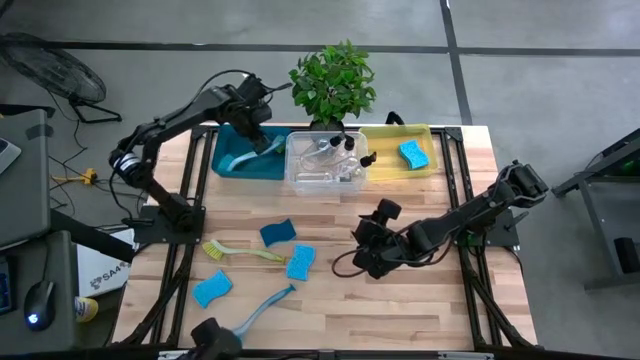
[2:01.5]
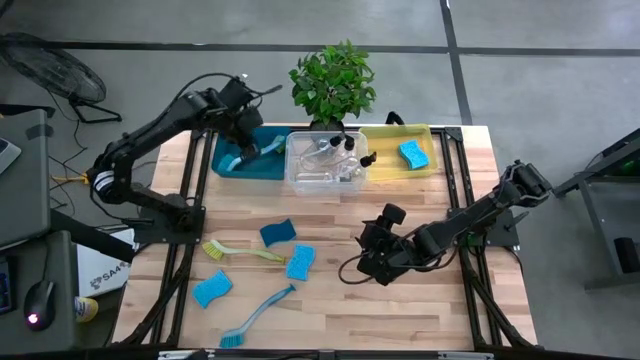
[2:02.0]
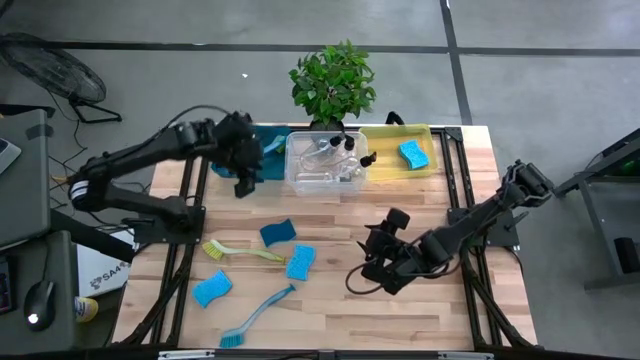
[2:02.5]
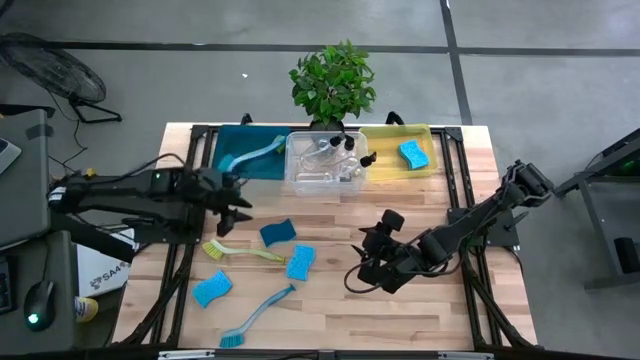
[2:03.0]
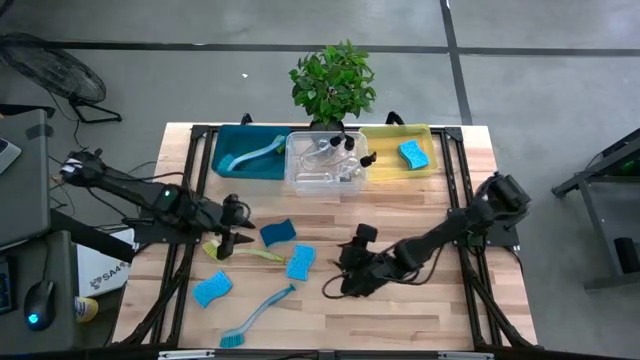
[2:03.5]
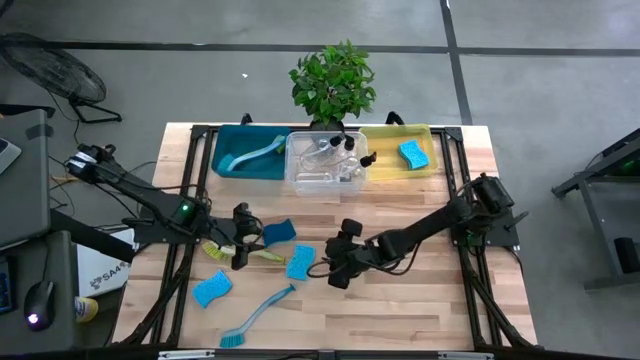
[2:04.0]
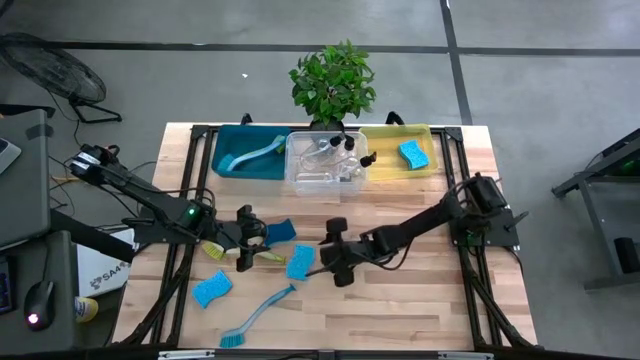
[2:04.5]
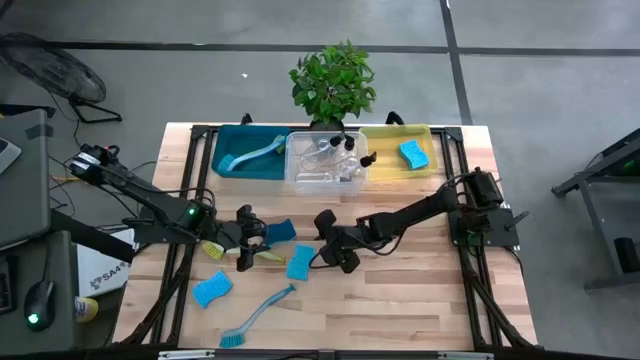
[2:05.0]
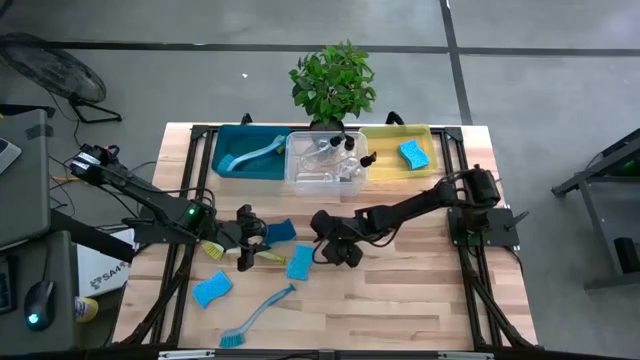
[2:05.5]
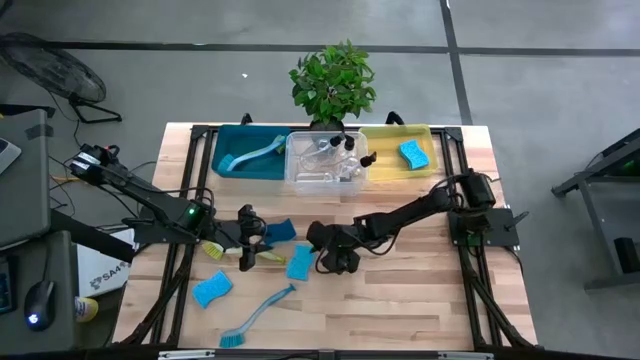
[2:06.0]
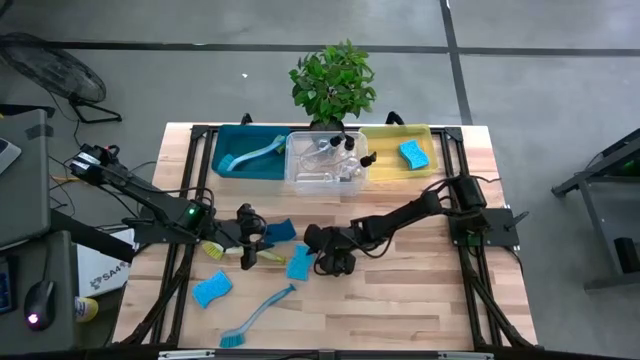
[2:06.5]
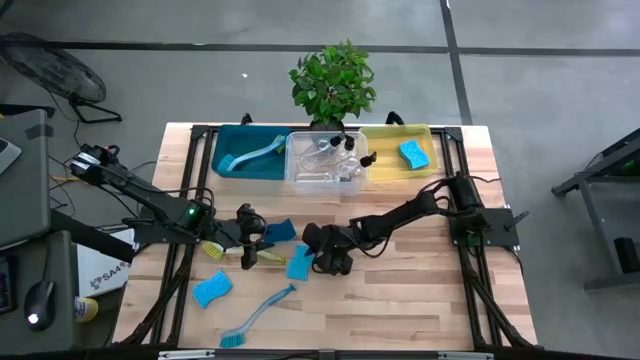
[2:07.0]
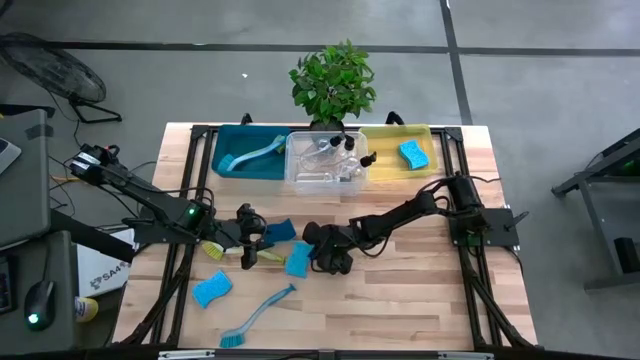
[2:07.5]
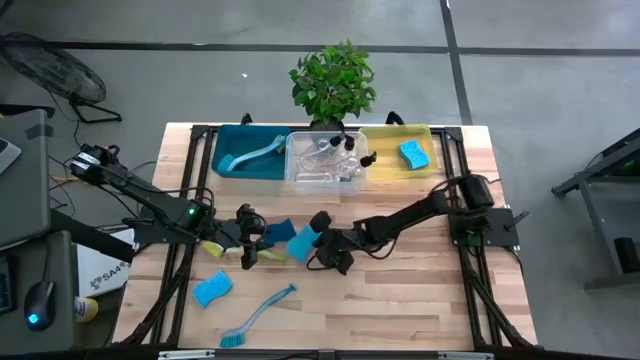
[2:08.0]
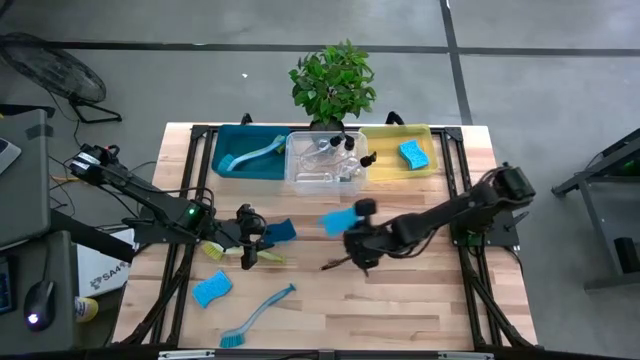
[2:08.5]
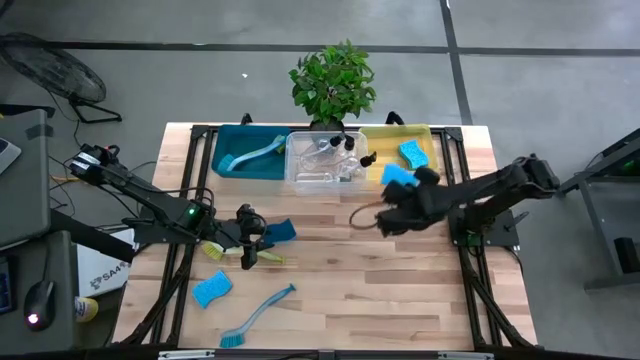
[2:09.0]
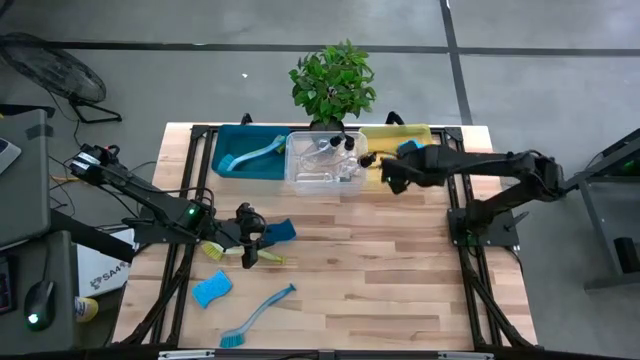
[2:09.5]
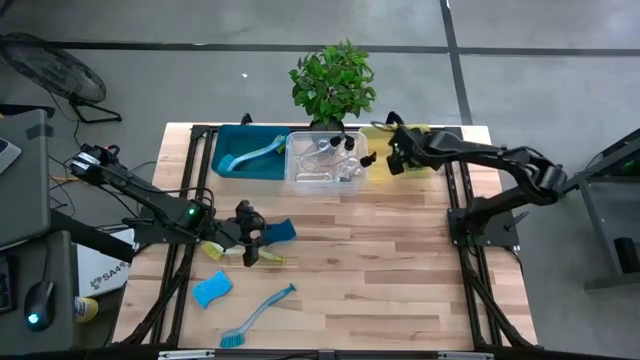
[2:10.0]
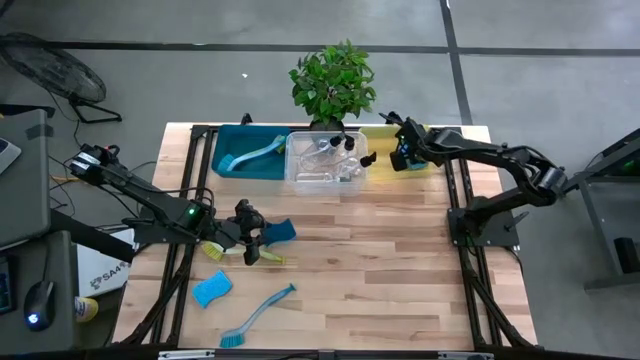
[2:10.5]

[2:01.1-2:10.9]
Task: Pick & Place Kitchen Sink Supplies
Put the light blue sponge into the yellow bin

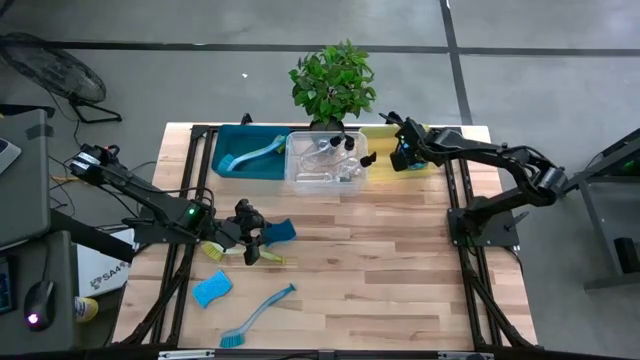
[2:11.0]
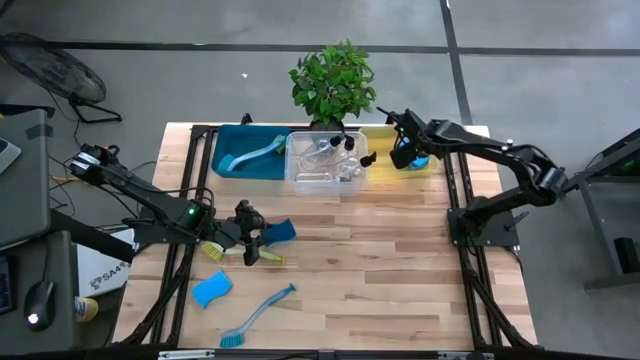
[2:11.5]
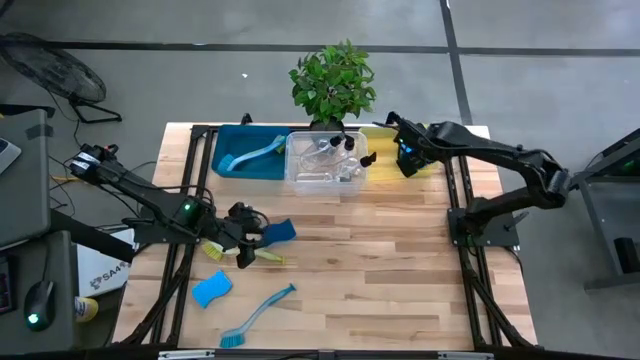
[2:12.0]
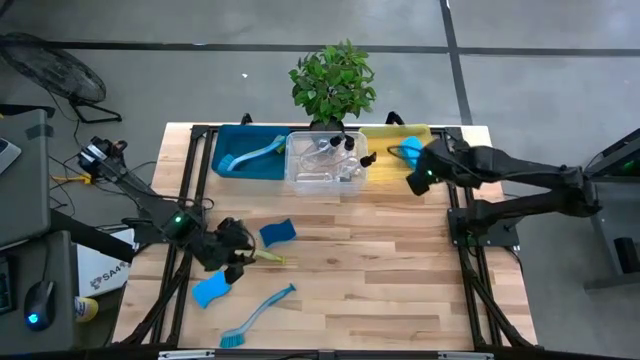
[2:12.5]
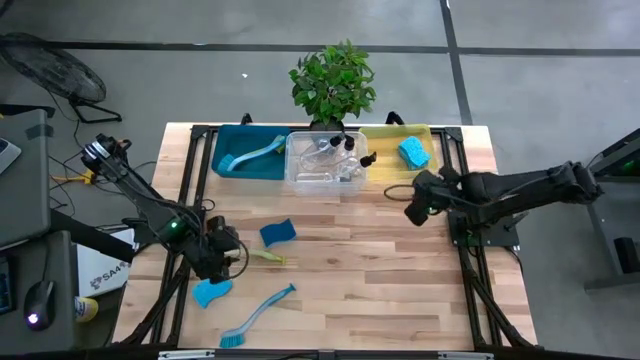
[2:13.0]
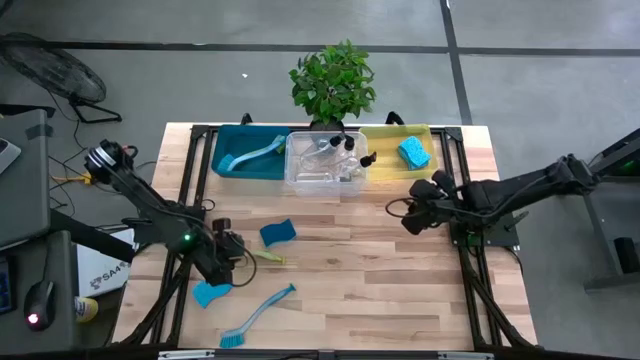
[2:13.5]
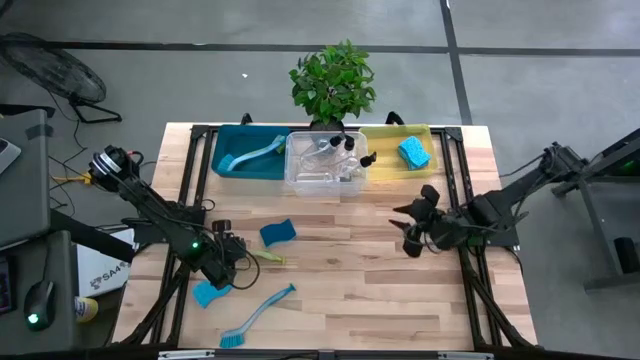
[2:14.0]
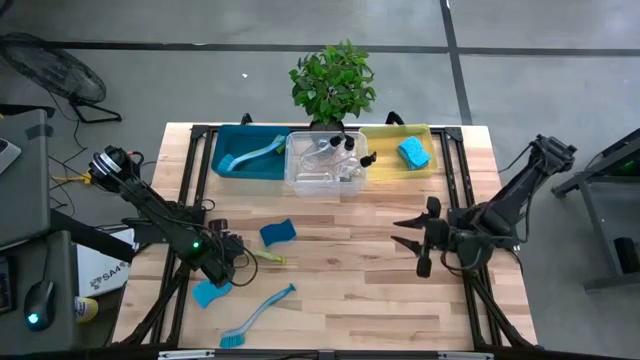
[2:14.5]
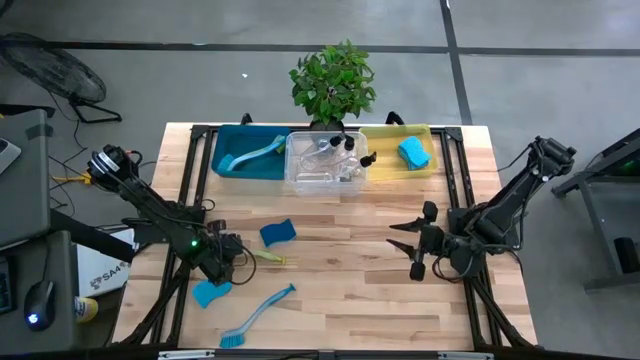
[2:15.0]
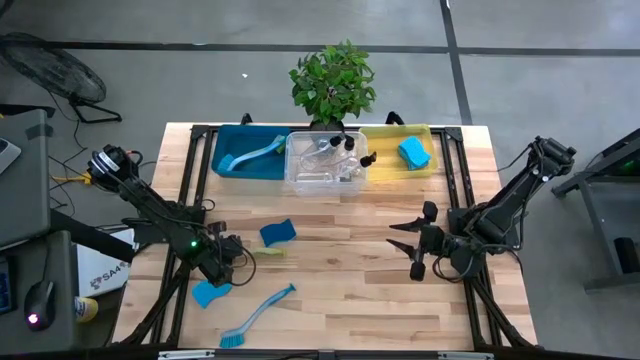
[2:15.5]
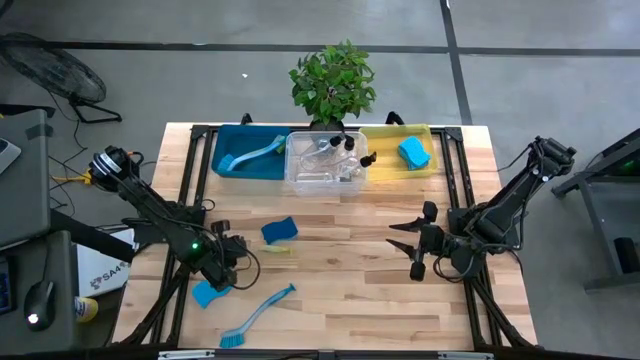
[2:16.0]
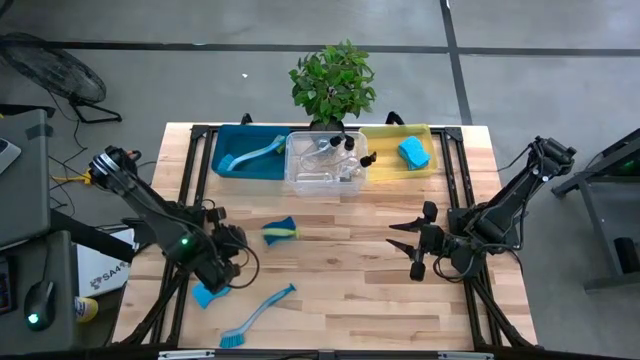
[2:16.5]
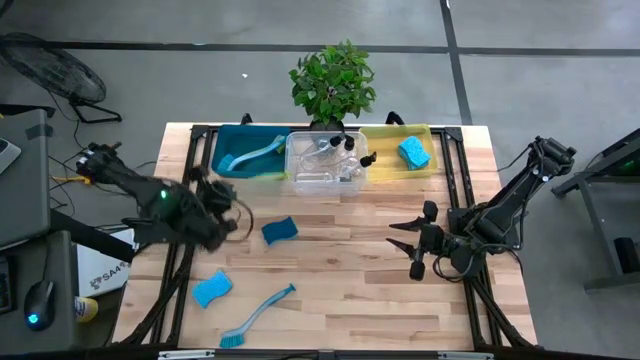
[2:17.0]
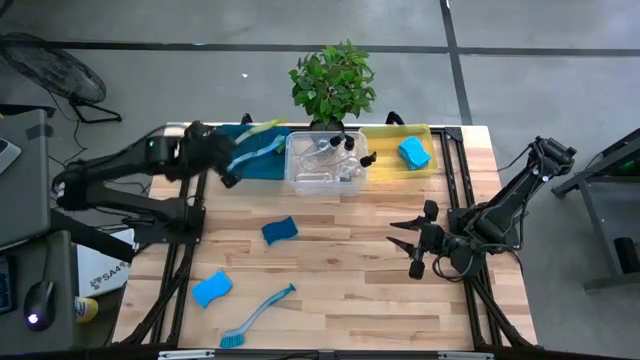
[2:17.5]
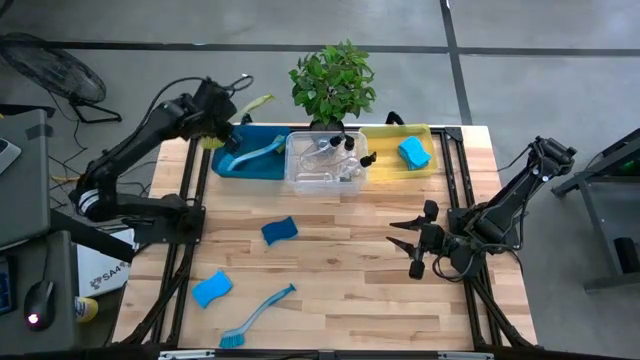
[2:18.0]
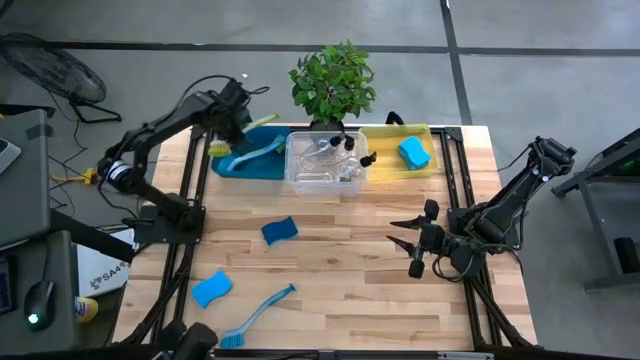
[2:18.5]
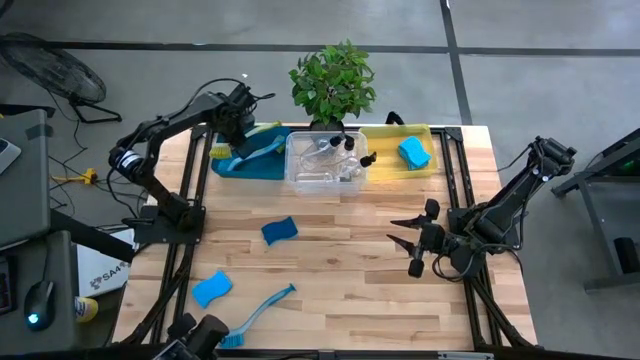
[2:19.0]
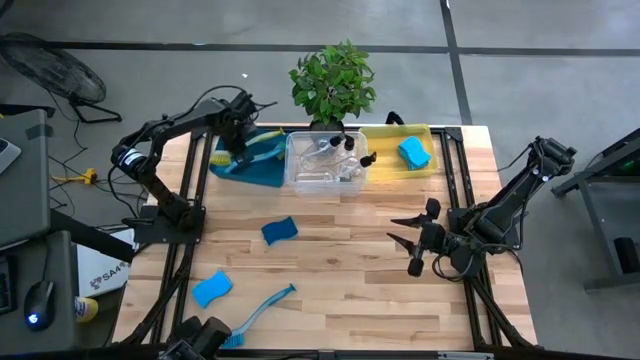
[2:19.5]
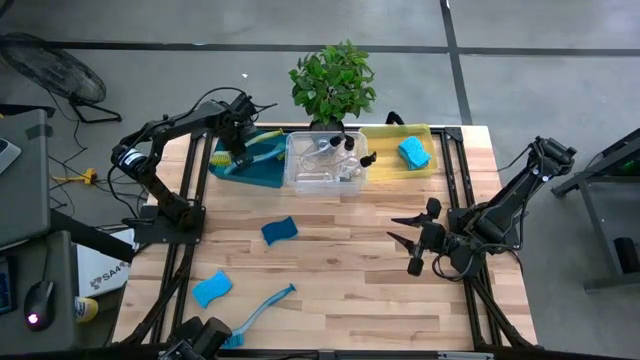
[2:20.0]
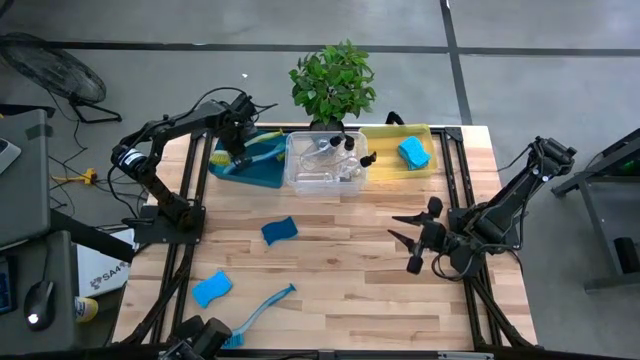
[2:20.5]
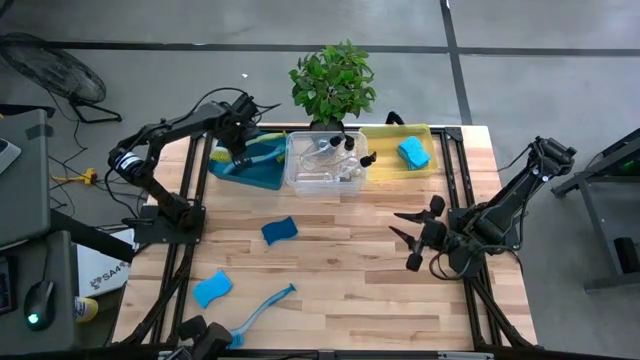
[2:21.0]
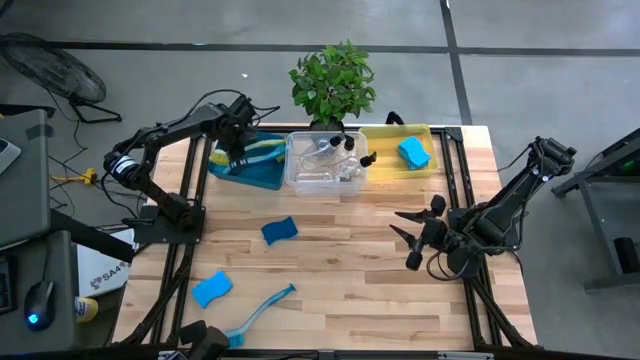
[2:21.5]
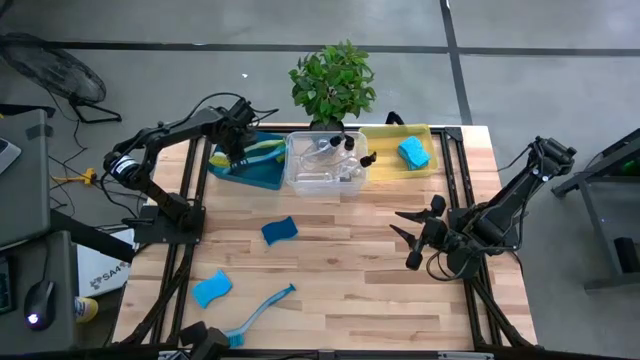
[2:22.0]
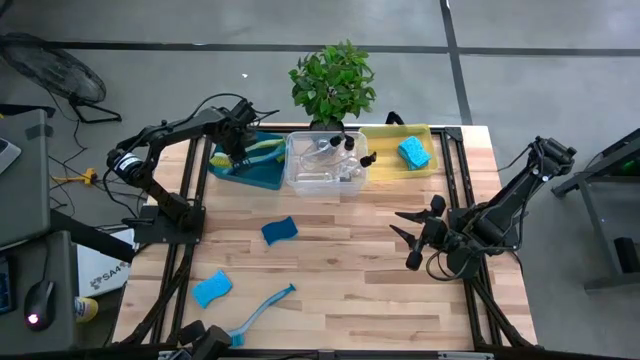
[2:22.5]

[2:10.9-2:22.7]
Put the light green dish brush into the blue bin

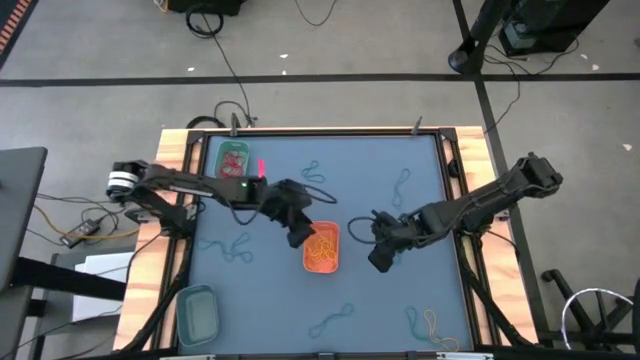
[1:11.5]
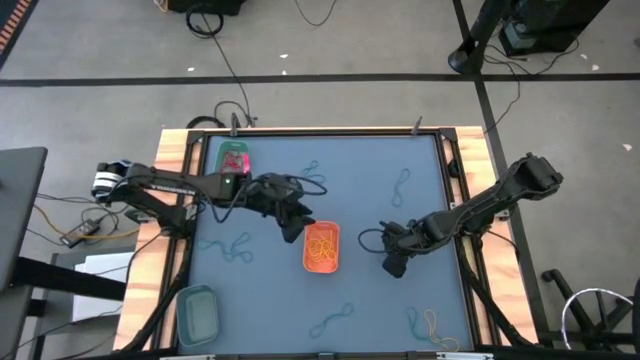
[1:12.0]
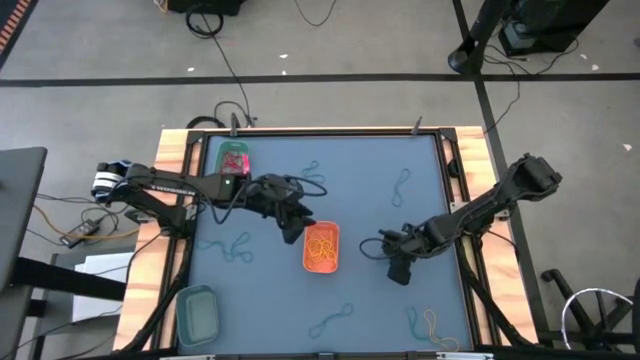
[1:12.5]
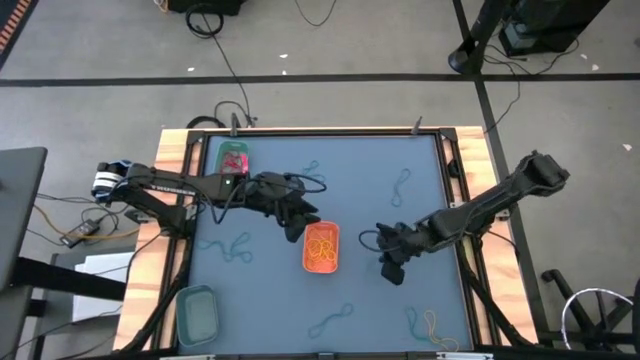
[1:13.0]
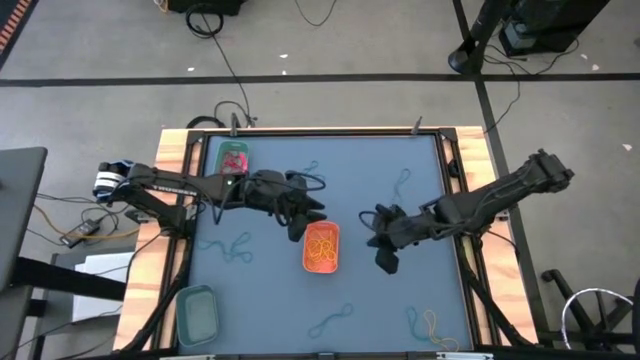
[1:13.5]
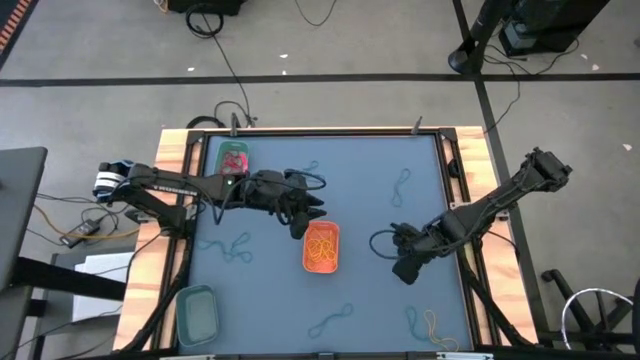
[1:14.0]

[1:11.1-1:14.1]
Task: Sort rubber bands into baskets
Put the blue rubber band into the blue bin
